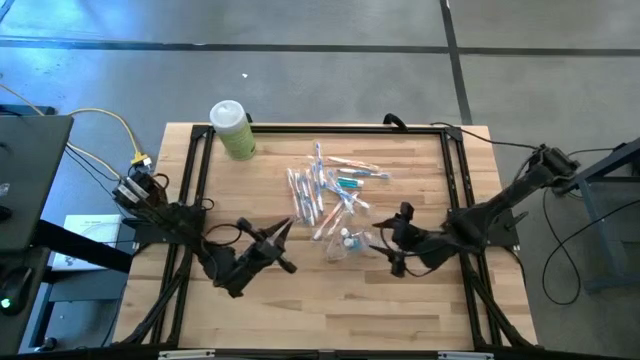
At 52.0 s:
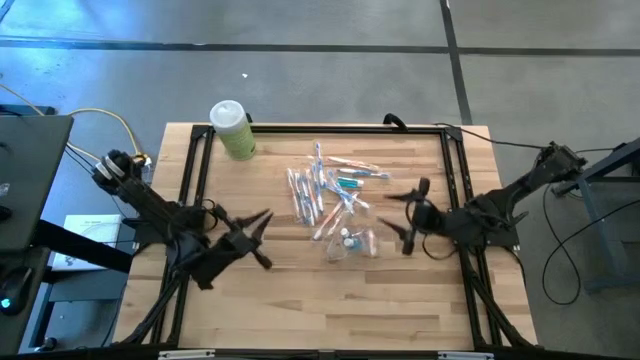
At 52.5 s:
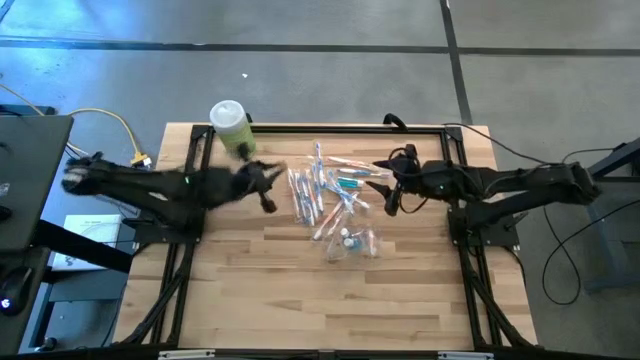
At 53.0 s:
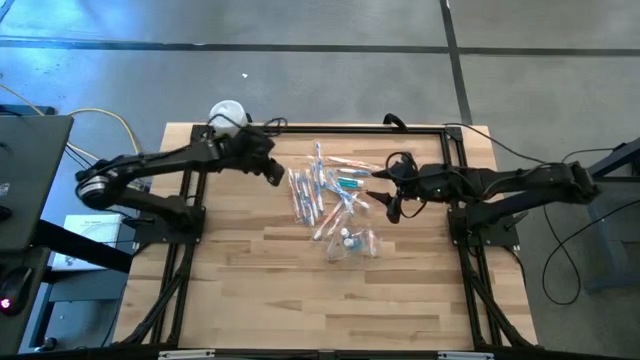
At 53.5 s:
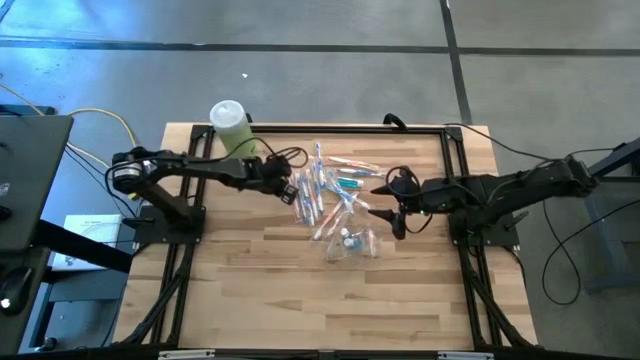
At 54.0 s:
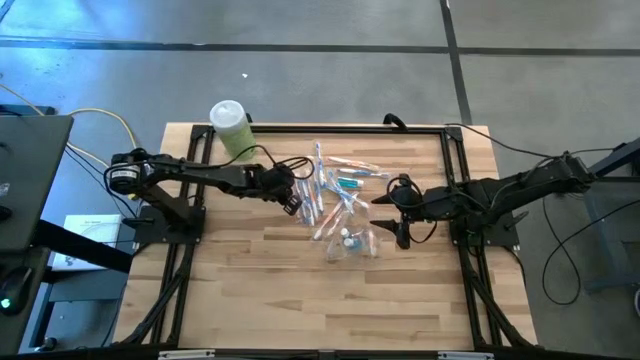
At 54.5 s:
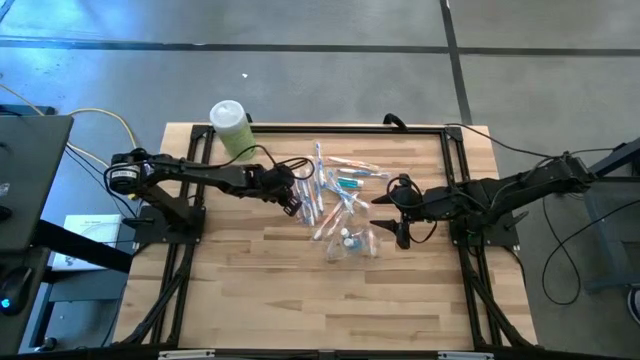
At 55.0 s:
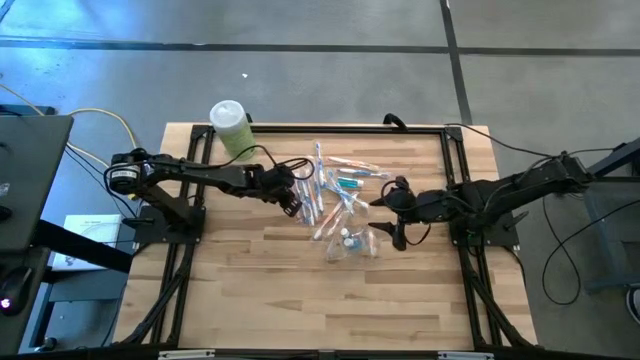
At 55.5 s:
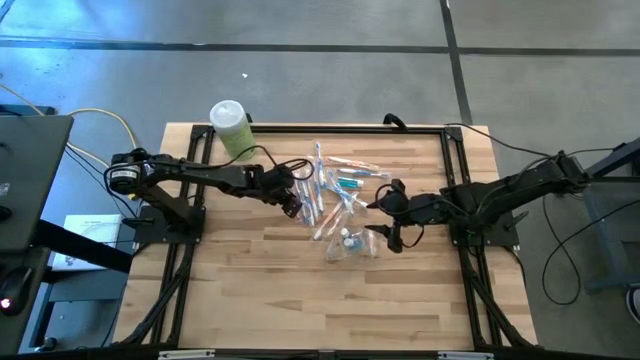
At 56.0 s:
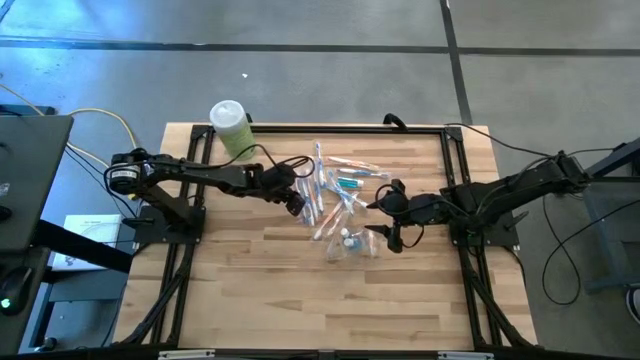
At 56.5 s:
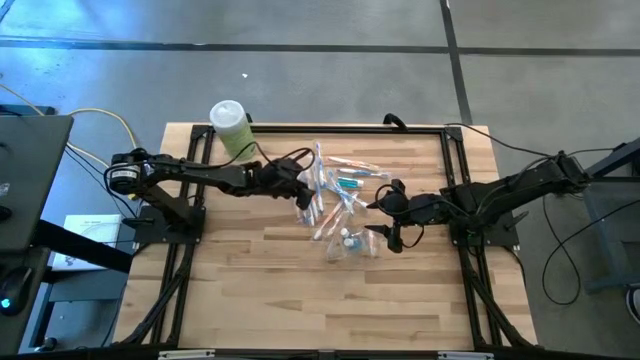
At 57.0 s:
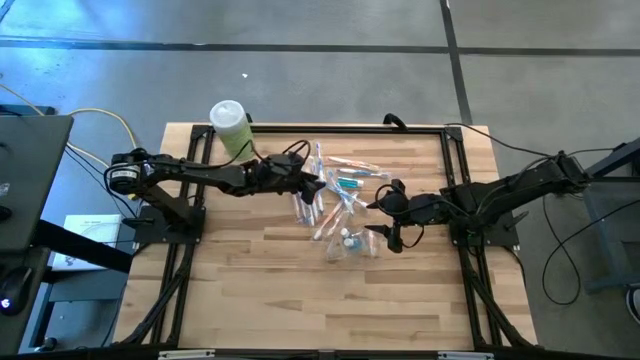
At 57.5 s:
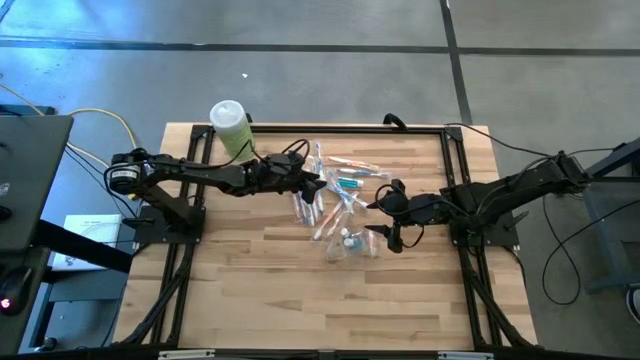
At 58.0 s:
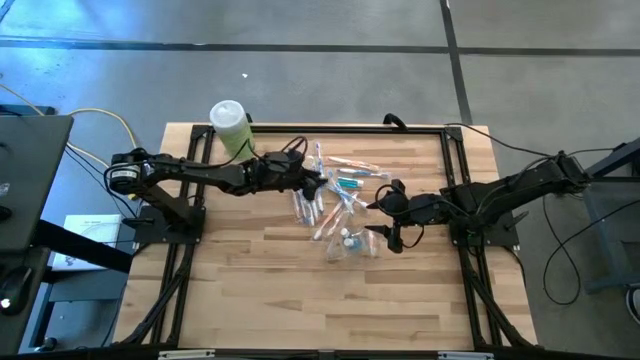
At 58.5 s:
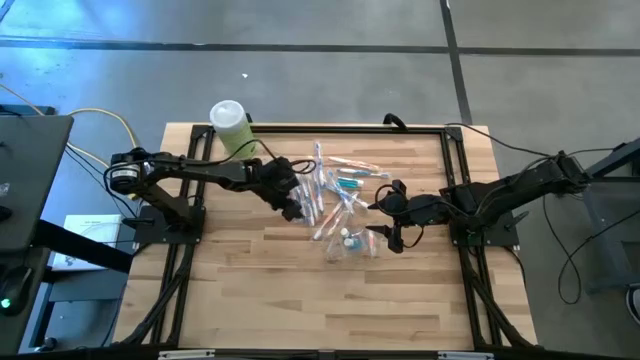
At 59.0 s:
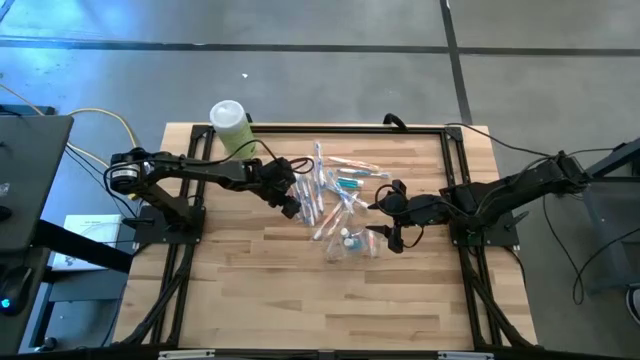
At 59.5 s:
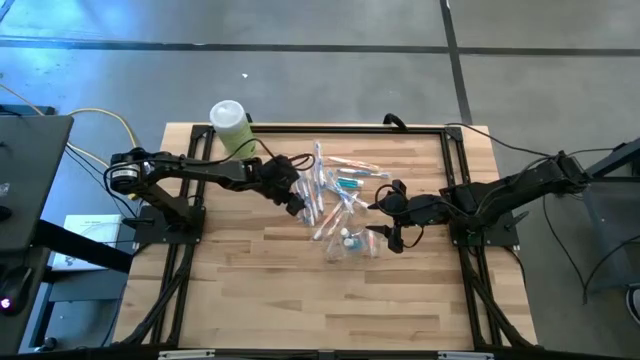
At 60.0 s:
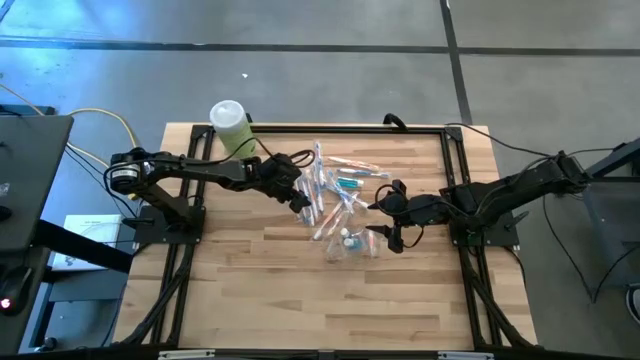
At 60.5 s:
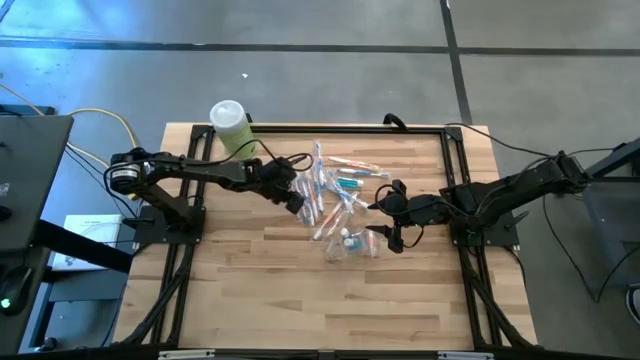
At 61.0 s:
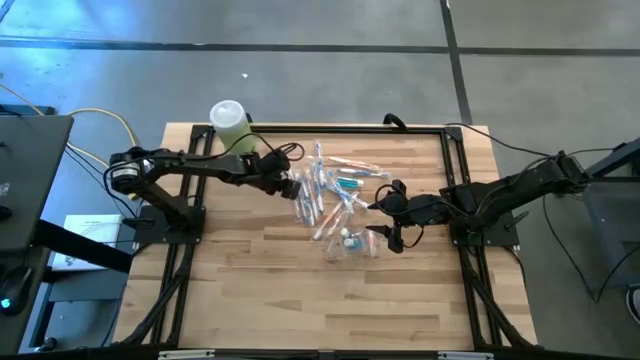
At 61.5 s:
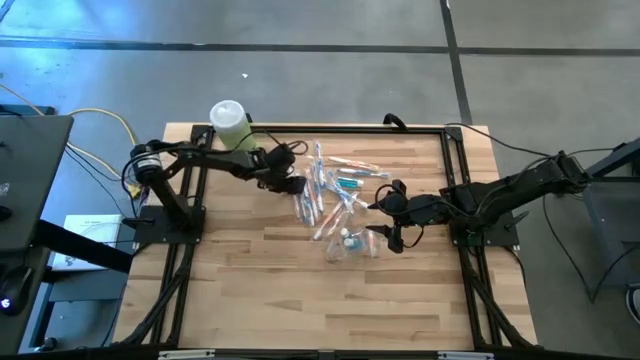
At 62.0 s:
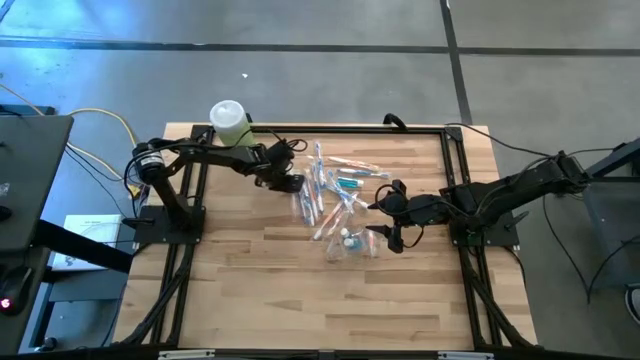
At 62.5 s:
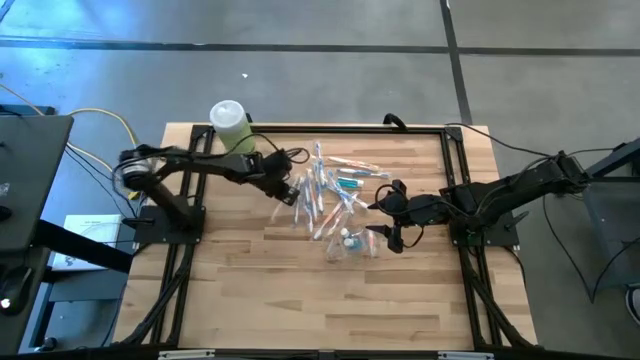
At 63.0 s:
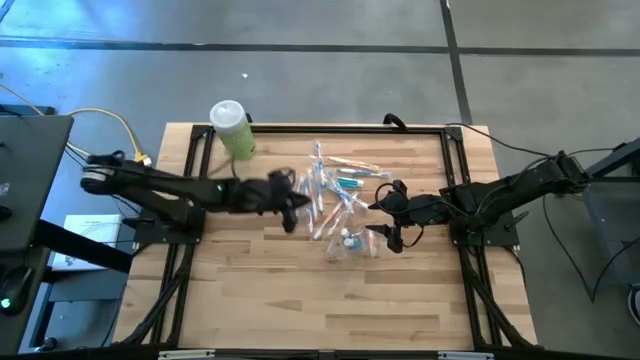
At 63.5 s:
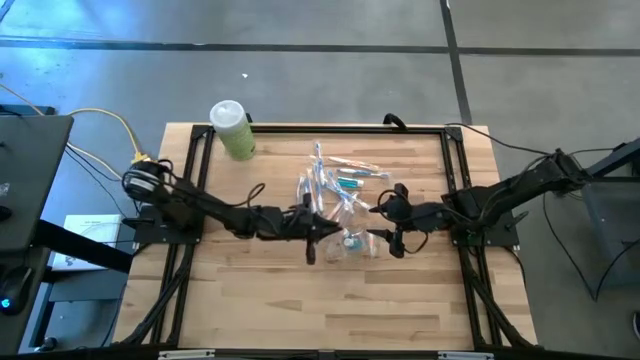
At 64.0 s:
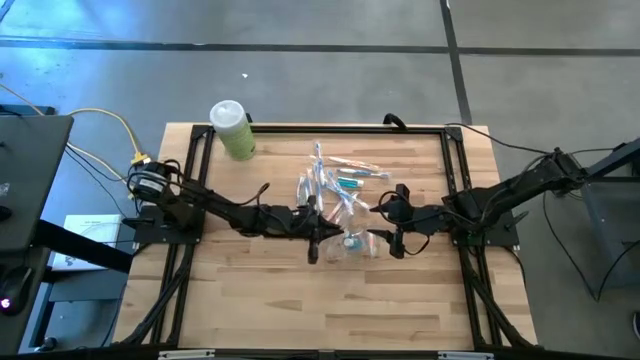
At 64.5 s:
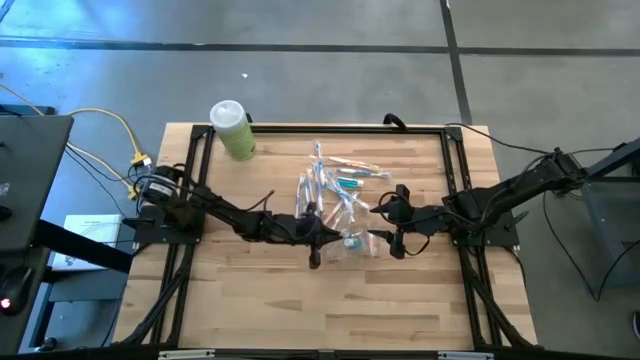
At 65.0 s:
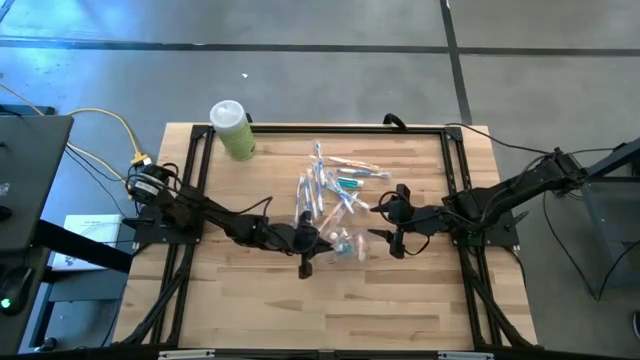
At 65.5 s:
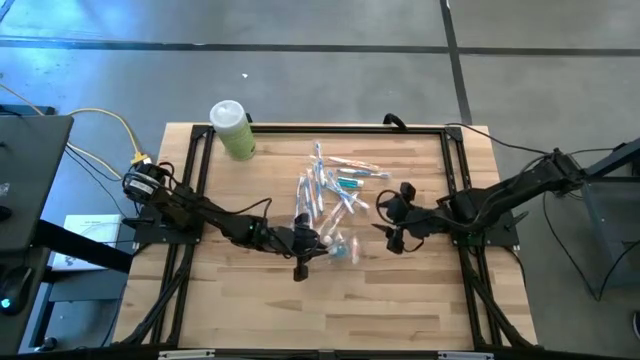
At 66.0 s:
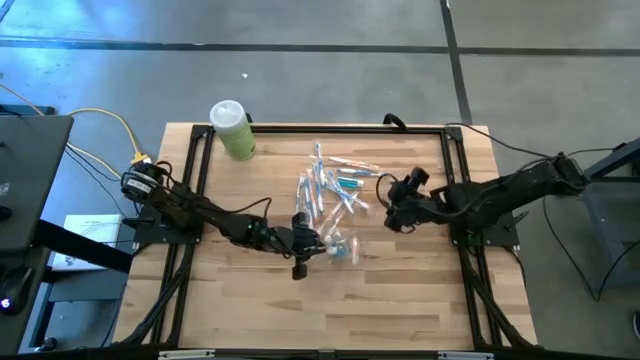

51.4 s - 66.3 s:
Task: Pick & Place toothbrushing station
Put the orange toothbrush into the transparent organizer

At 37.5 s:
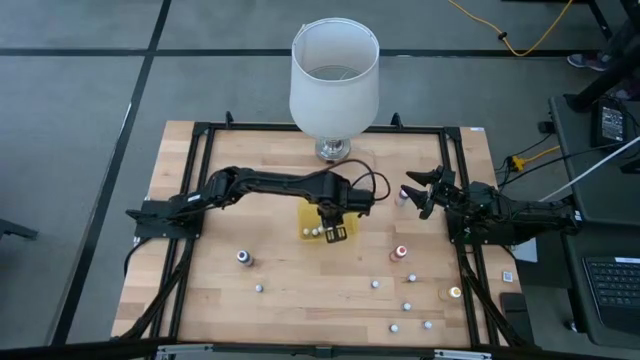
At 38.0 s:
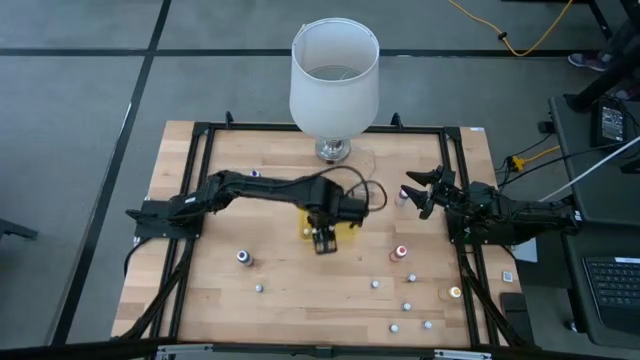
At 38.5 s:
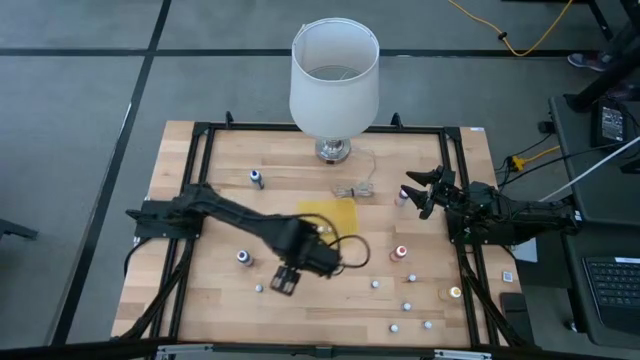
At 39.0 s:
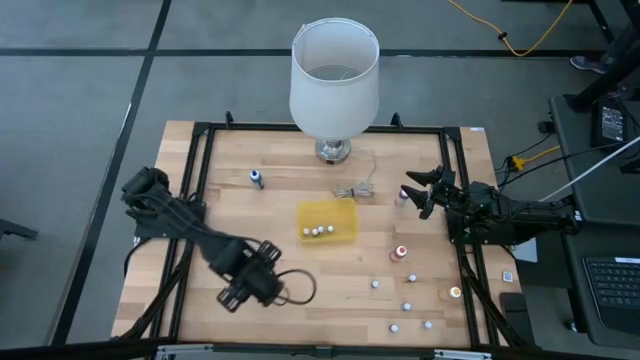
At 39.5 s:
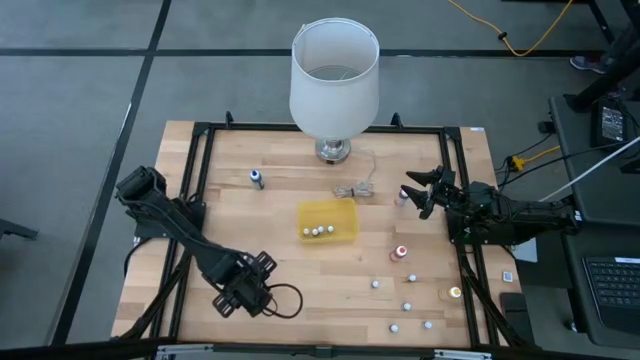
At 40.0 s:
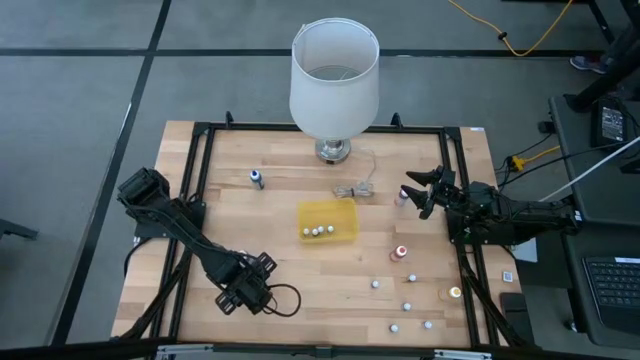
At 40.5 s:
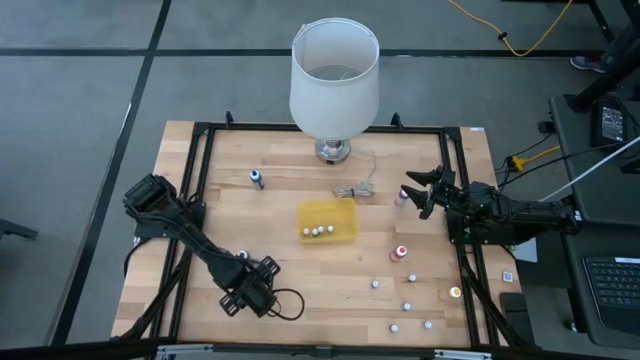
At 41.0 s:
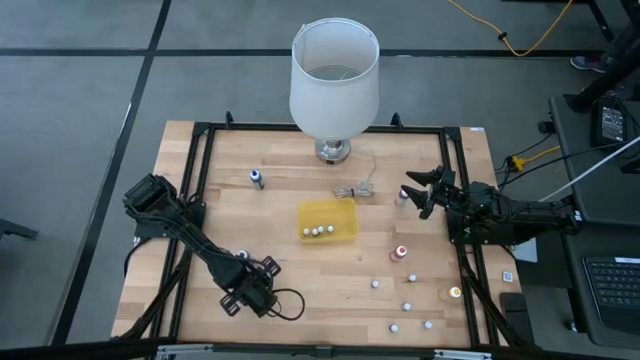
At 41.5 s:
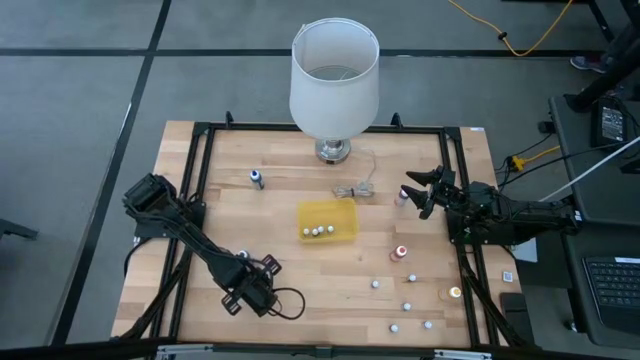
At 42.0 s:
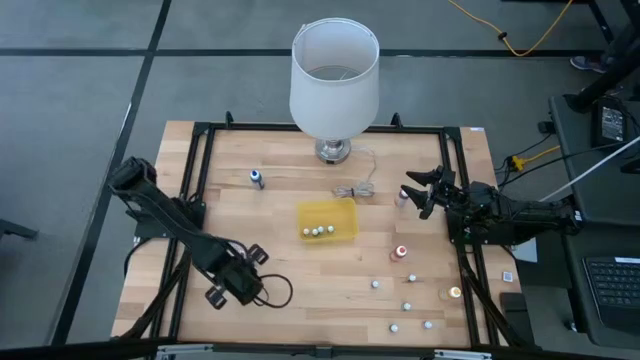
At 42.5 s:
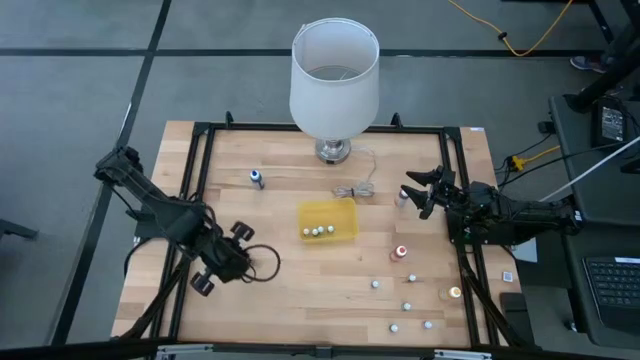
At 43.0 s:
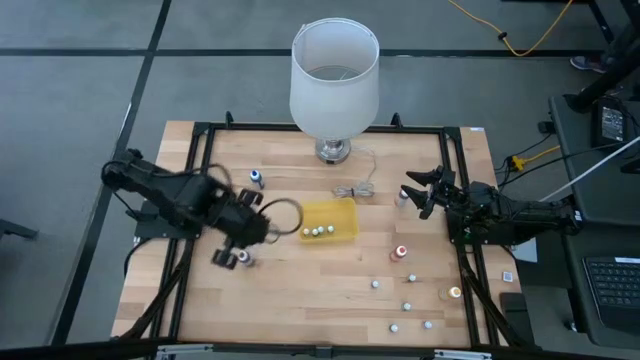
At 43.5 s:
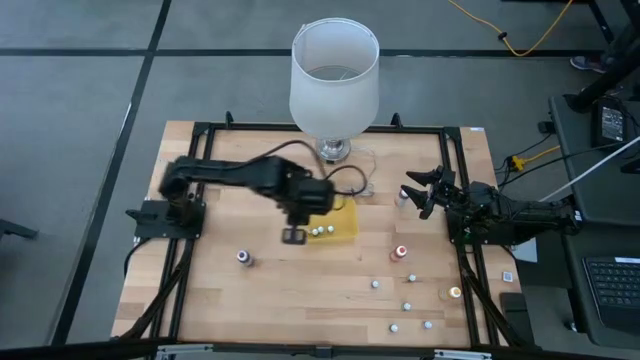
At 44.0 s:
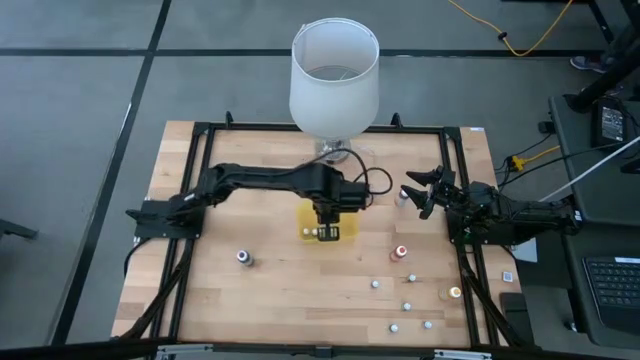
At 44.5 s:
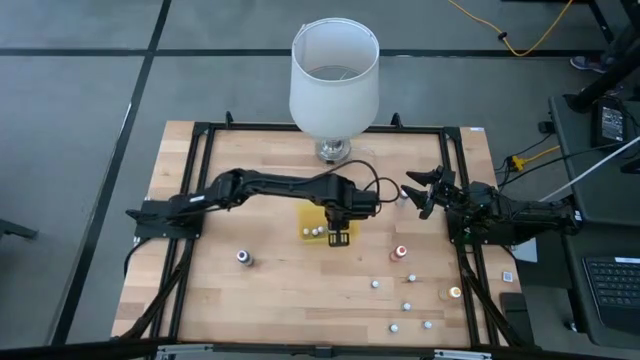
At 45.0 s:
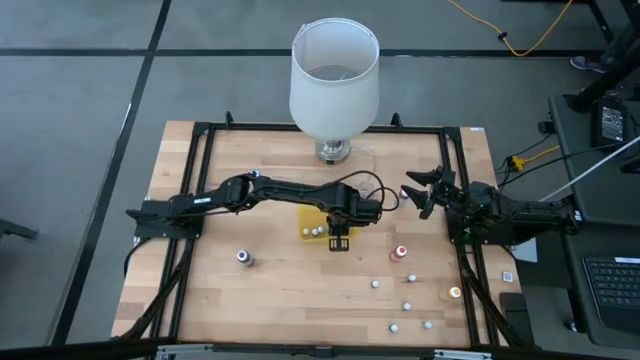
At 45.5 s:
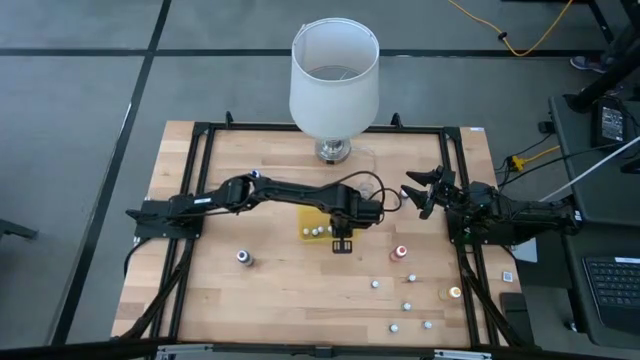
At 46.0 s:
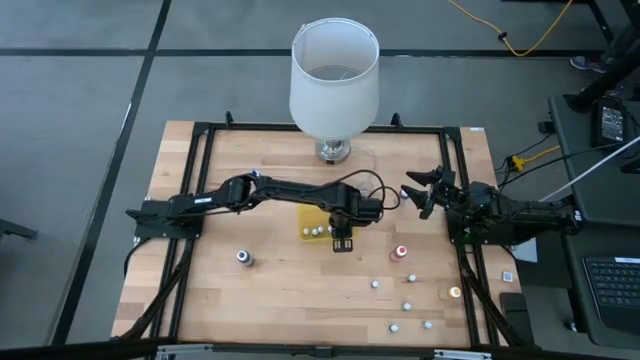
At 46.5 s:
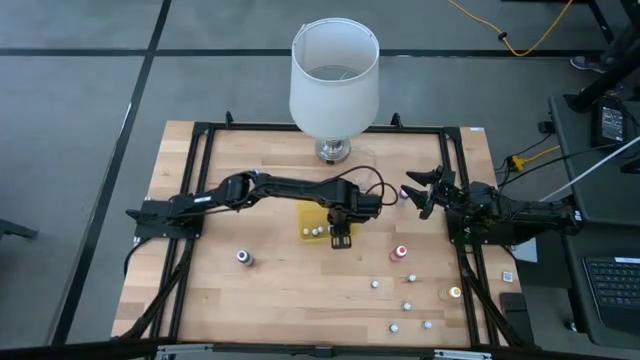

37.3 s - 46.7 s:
Task: Pick & Place food coloring
Put the left small red food coloring bottle into the yellow bin
